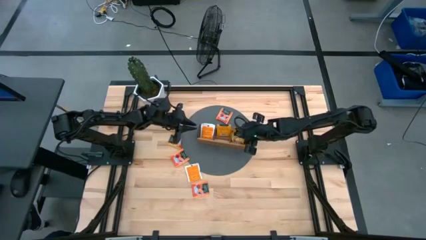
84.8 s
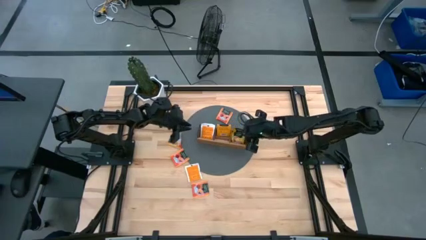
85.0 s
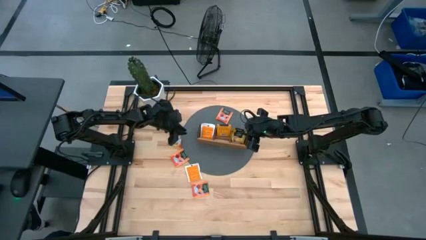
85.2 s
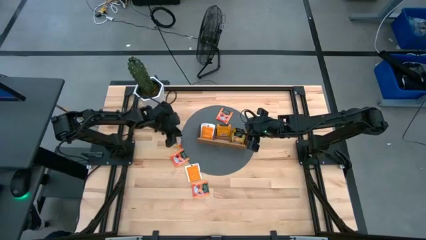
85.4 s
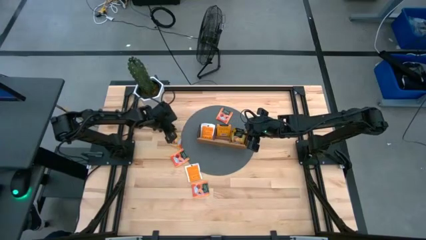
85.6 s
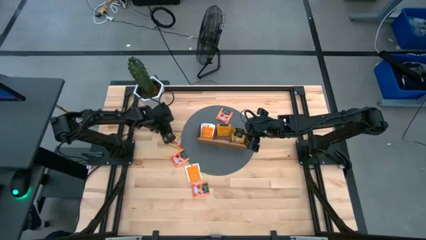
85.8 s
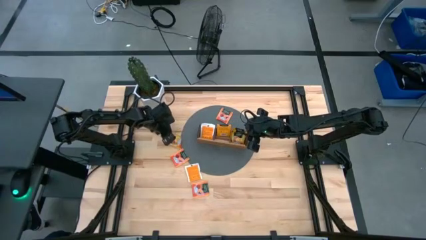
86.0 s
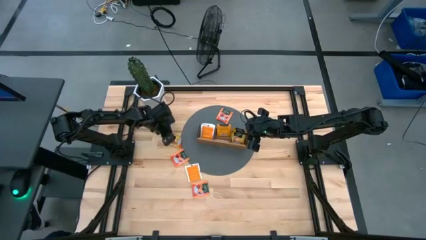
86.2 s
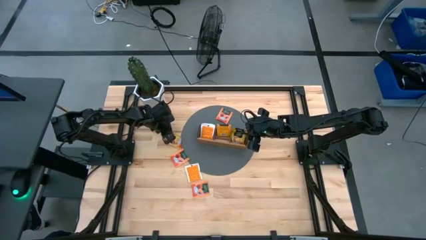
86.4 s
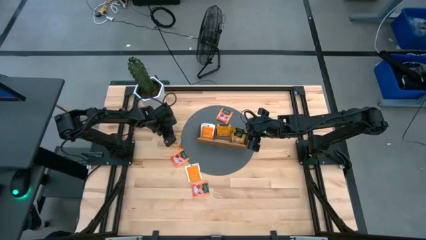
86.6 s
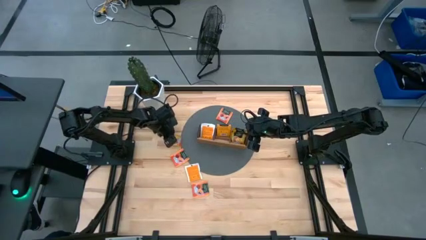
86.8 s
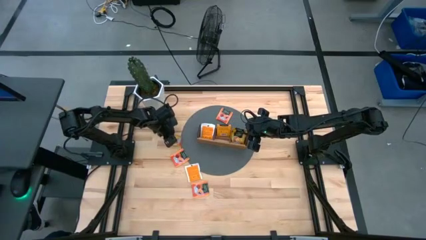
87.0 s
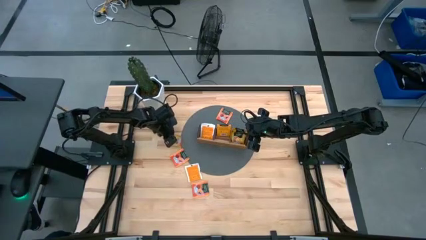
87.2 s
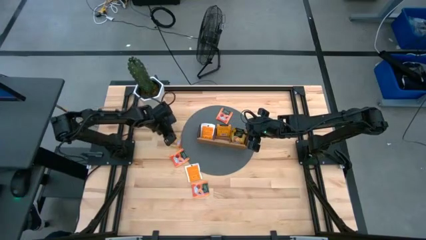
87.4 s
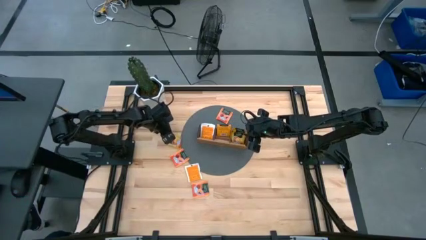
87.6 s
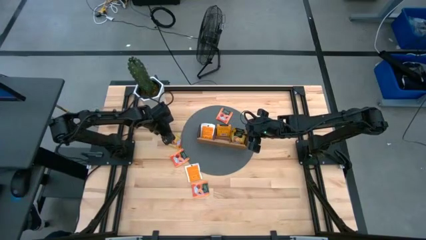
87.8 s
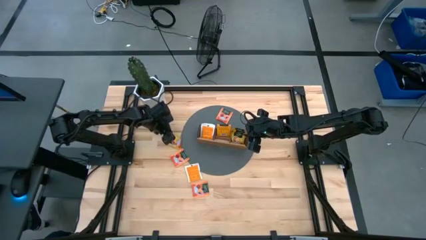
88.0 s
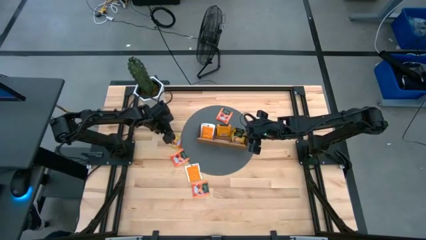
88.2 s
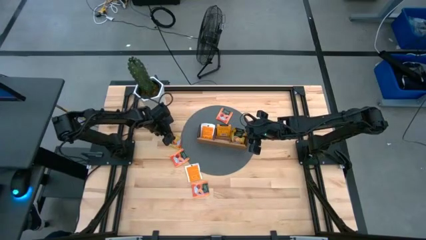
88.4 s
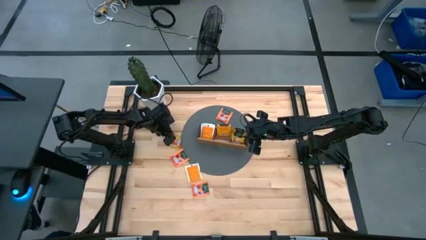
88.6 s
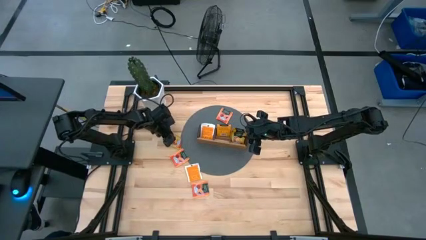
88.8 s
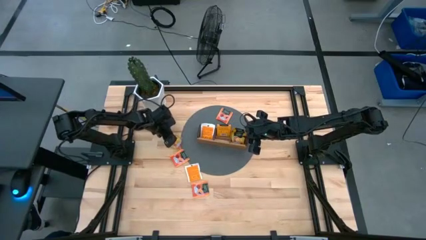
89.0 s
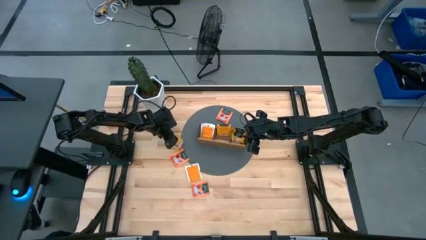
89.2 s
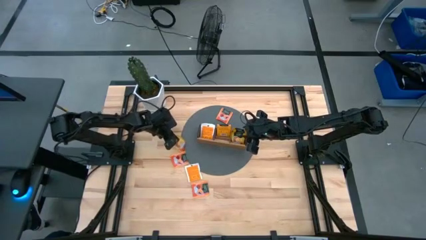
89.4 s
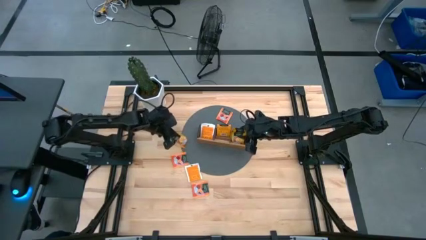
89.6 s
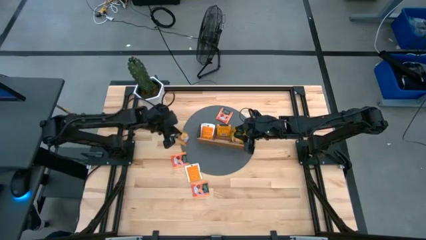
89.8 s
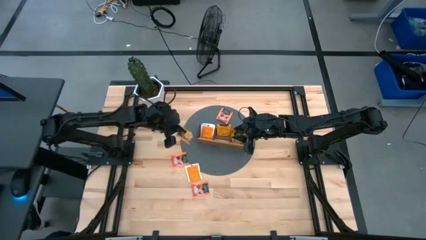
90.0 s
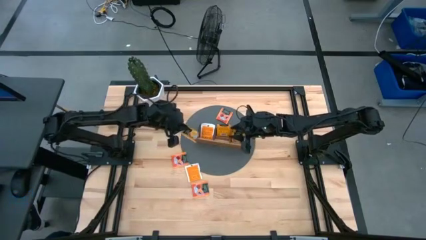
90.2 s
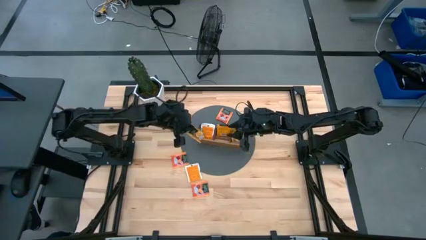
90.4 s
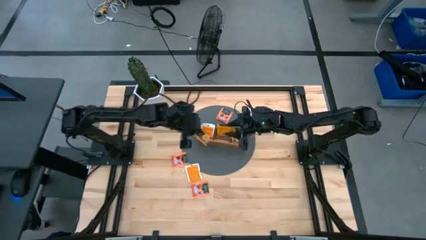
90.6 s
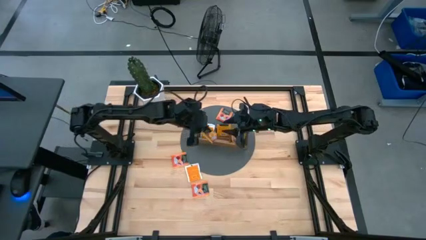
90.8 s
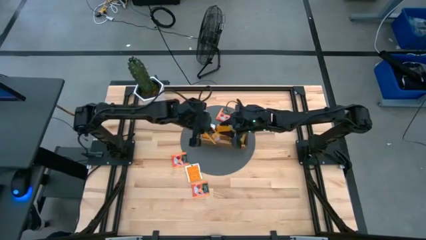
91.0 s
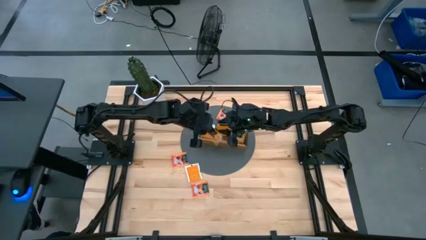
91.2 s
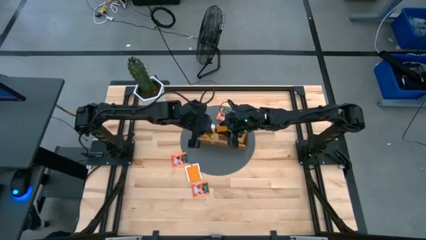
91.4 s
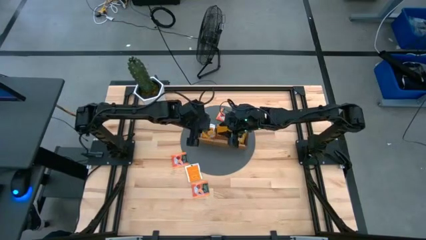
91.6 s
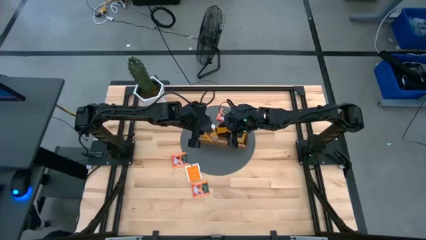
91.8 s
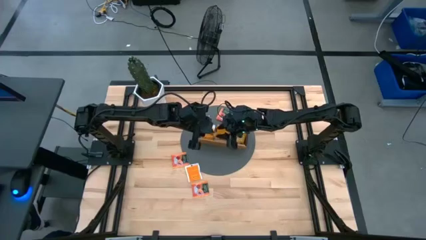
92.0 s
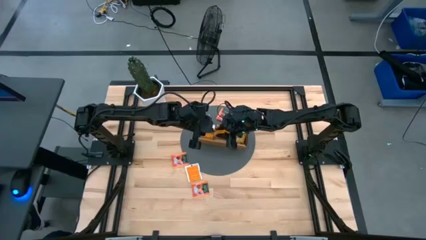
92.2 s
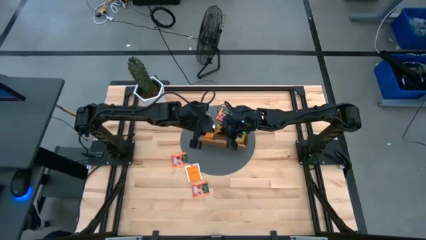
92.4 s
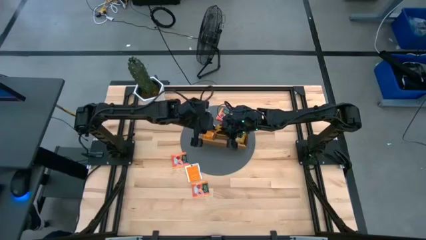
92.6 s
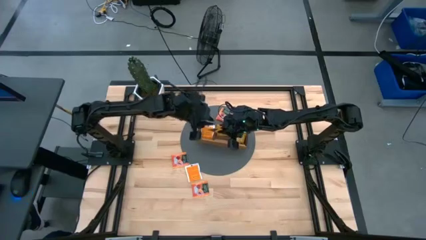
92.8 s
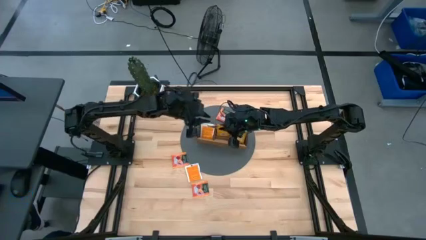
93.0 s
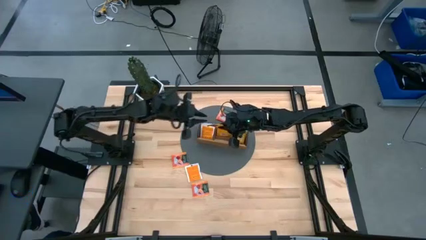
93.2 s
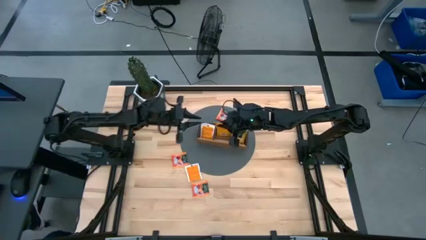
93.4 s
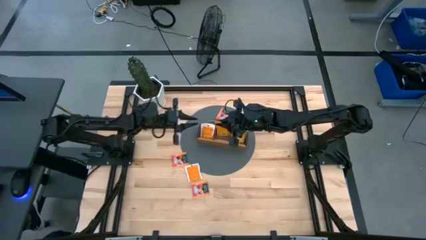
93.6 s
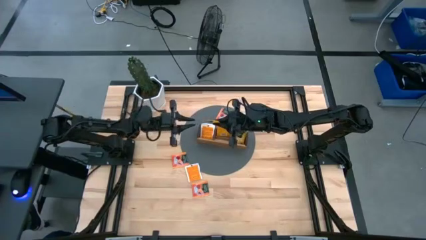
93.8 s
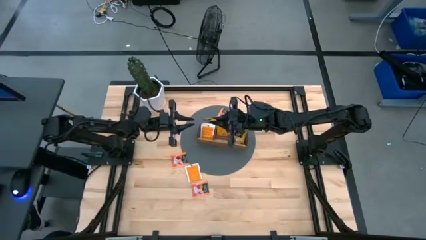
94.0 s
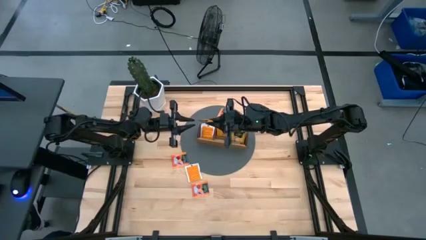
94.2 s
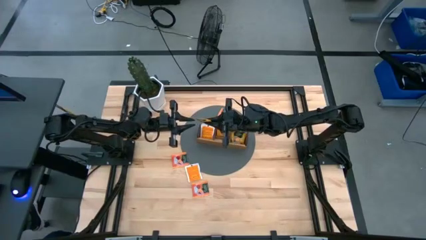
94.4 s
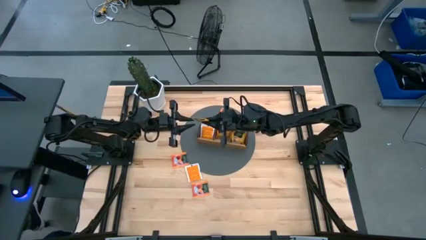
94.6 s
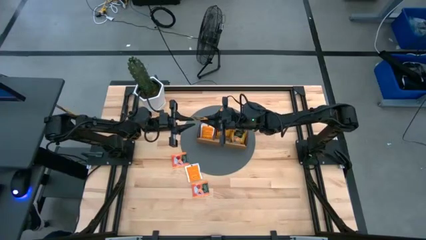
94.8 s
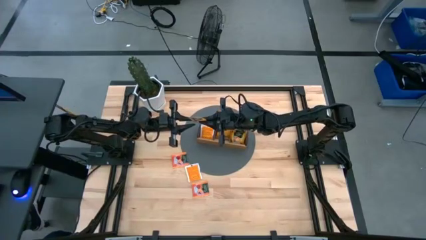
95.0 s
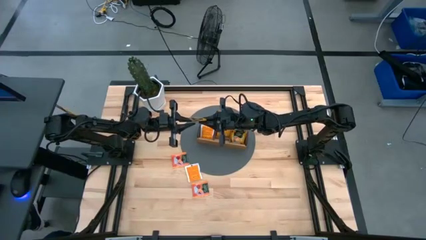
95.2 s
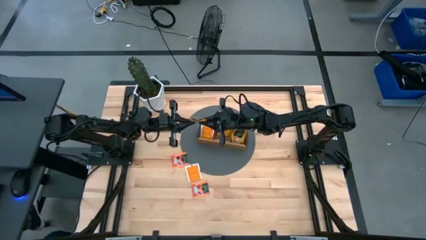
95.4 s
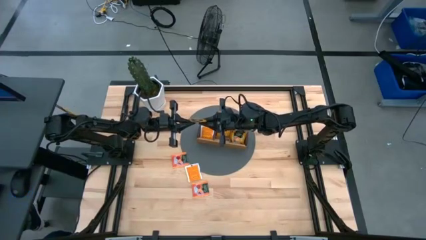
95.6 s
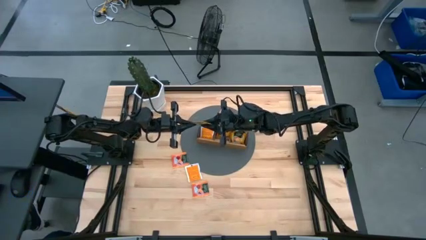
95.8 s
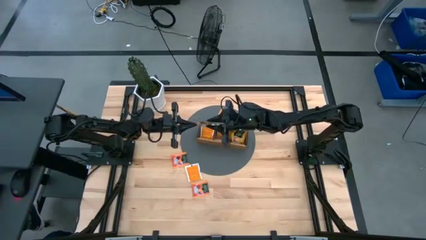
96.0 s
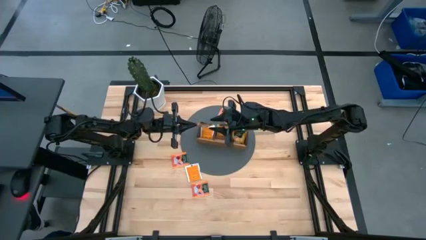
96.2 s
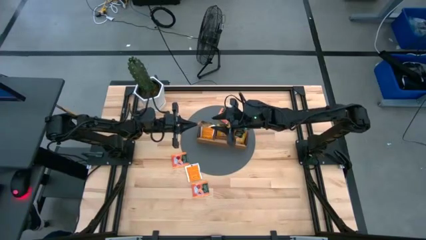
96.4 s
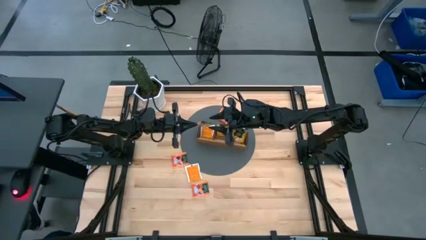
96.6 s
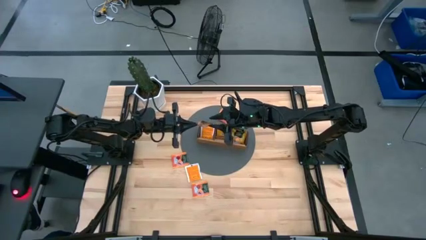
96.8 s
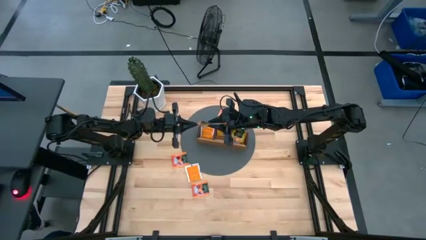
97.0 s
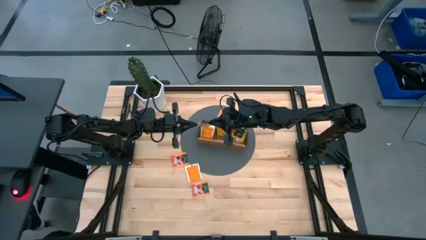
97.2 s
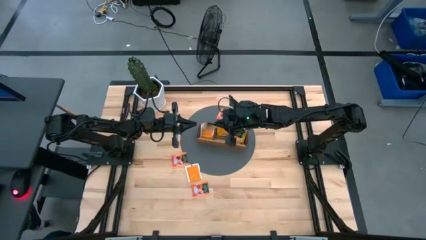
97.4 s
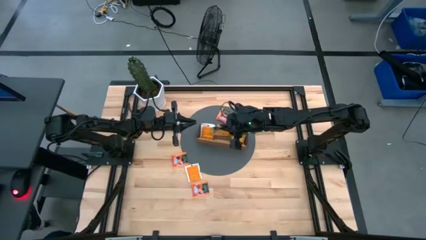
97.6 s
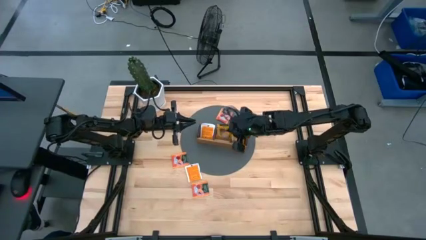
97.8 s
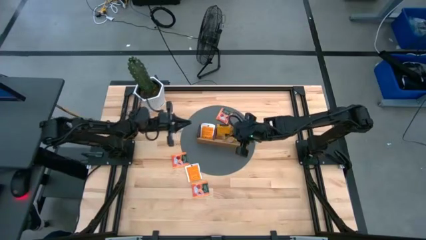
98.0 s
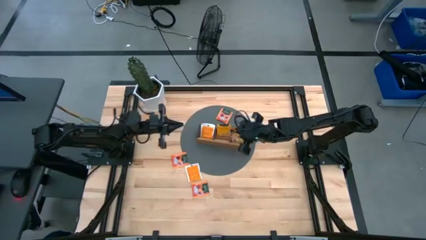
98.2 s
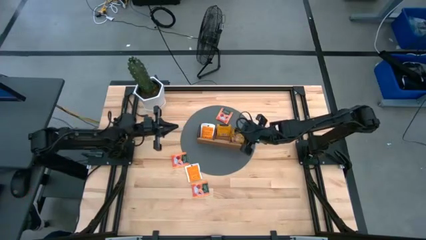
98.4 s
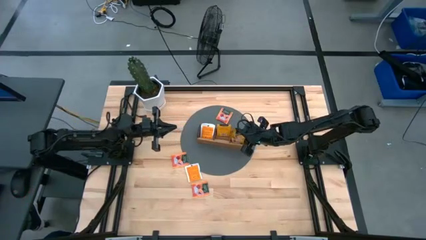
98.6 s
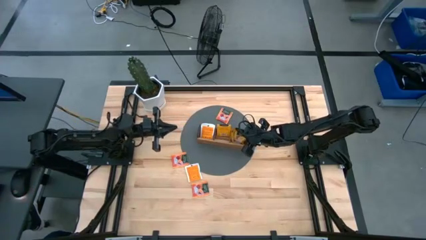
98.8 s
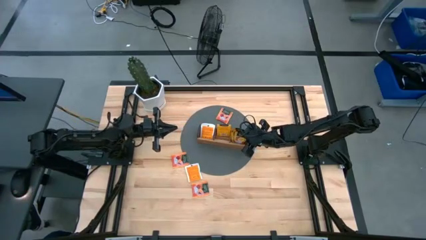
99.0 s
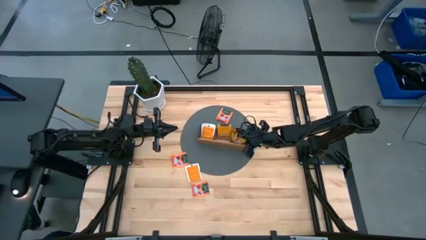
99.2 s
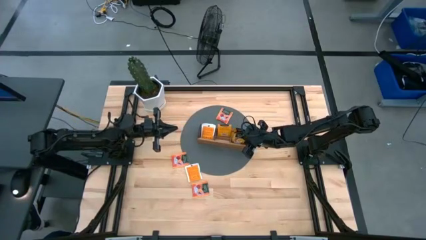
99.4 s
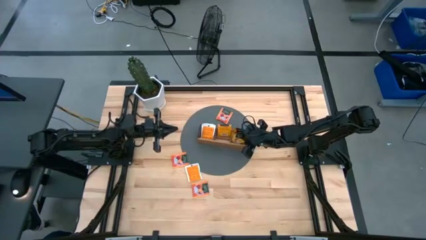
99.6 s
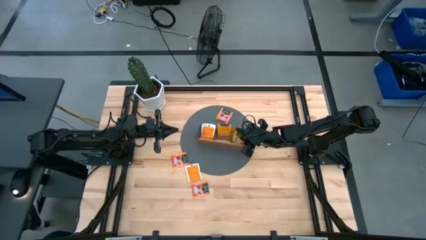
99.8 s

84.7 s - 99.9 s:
Task: Pick & Place Tea
Put the yellow tea bag into the right section of the wooden organizer
